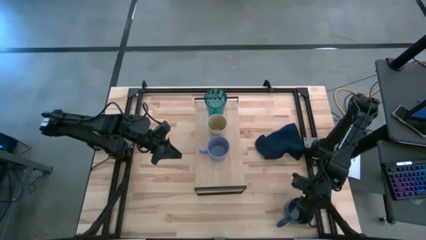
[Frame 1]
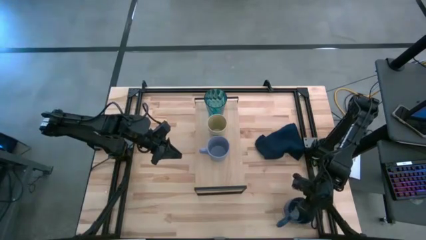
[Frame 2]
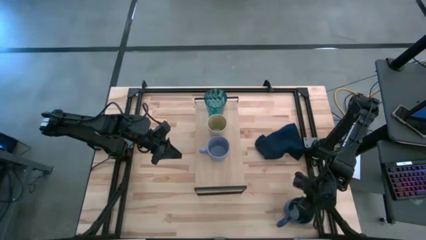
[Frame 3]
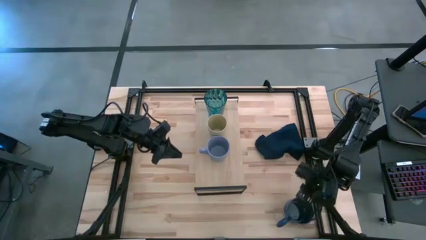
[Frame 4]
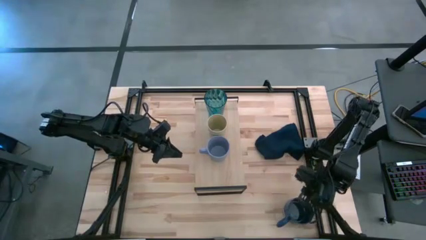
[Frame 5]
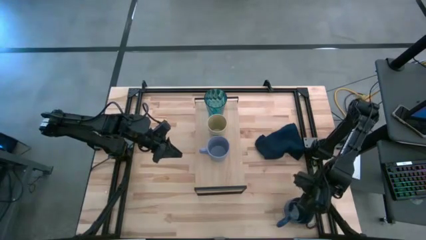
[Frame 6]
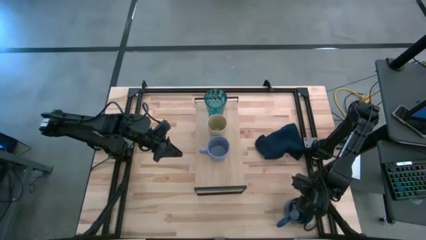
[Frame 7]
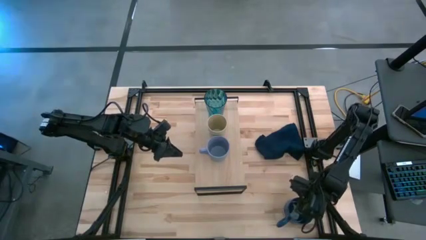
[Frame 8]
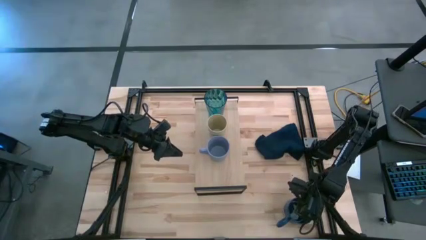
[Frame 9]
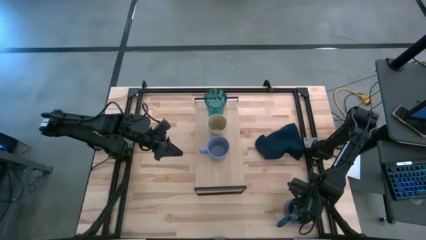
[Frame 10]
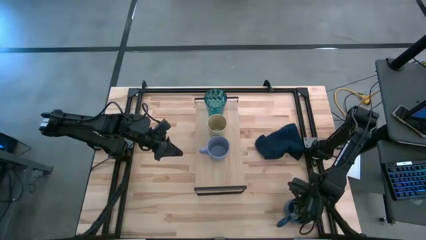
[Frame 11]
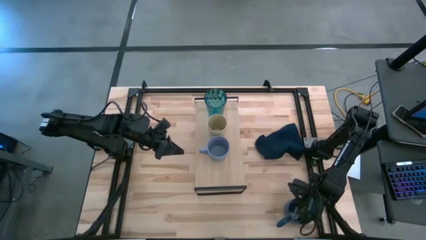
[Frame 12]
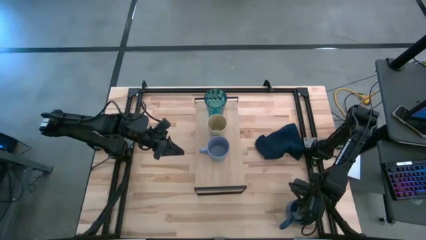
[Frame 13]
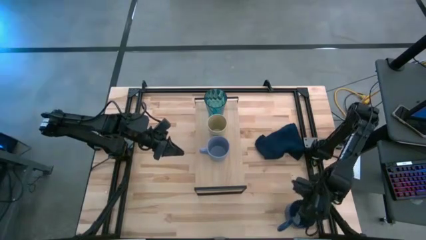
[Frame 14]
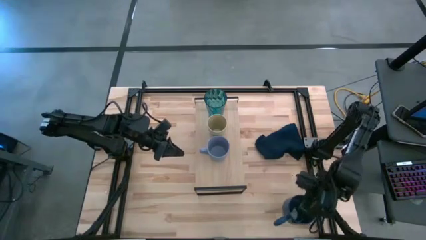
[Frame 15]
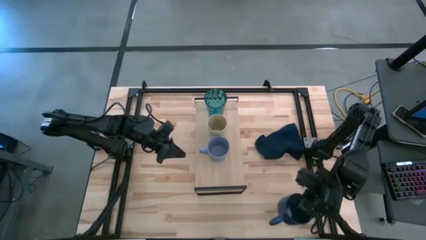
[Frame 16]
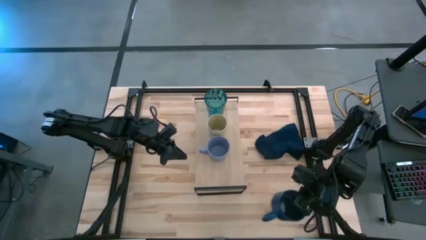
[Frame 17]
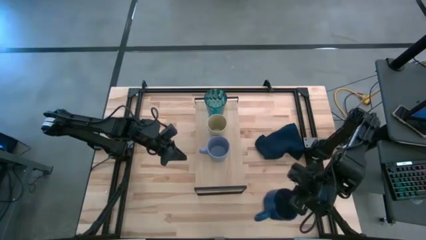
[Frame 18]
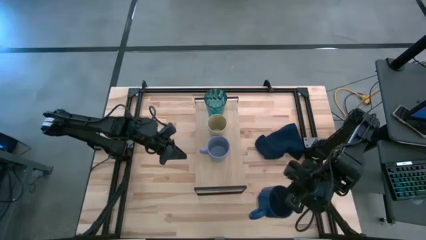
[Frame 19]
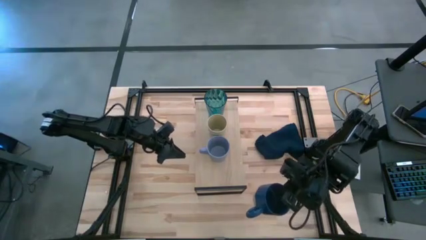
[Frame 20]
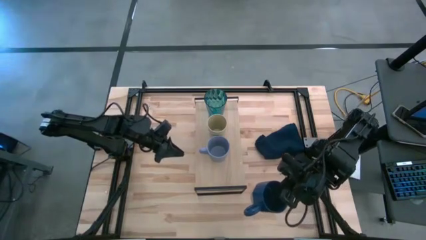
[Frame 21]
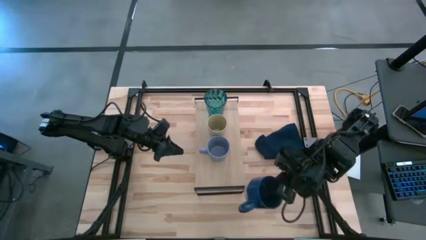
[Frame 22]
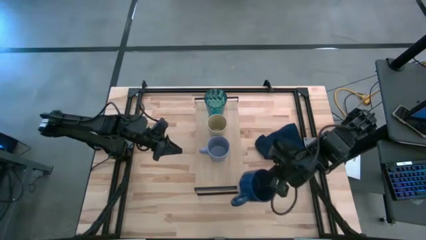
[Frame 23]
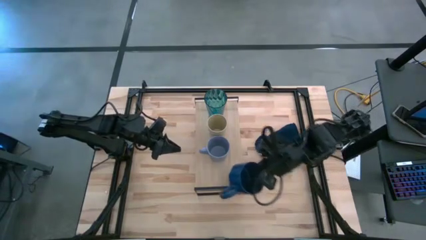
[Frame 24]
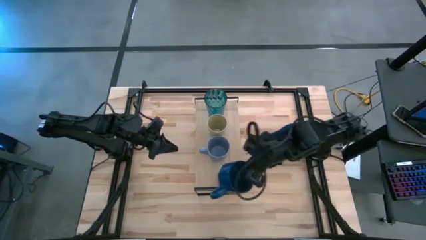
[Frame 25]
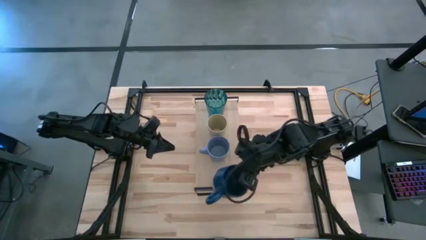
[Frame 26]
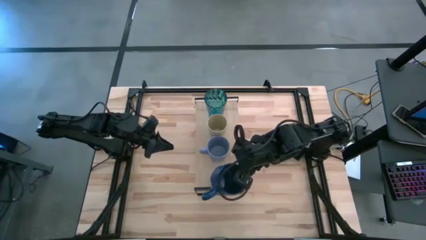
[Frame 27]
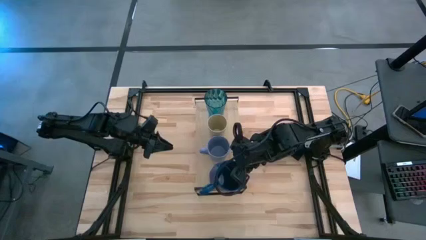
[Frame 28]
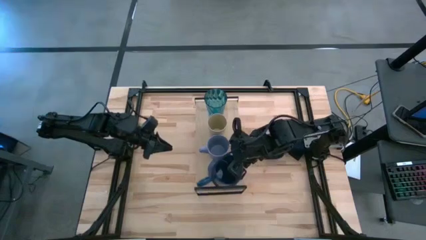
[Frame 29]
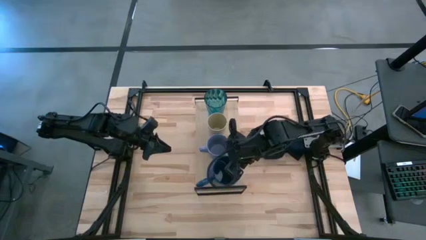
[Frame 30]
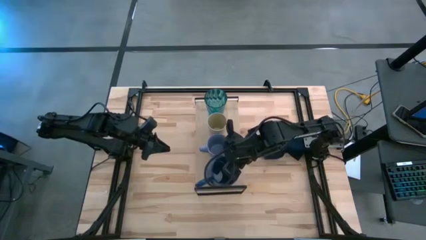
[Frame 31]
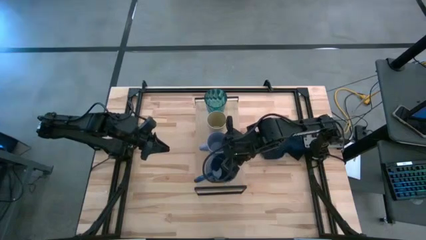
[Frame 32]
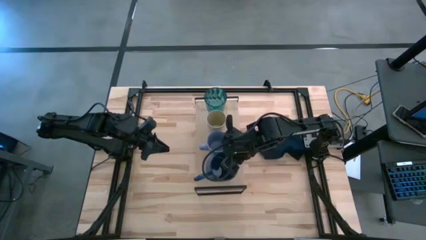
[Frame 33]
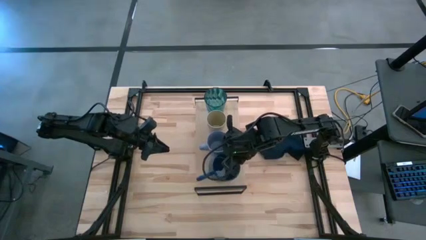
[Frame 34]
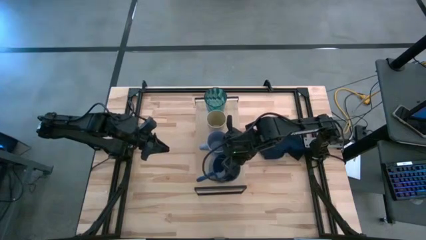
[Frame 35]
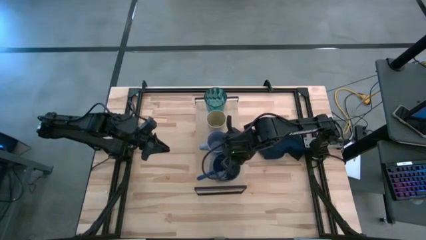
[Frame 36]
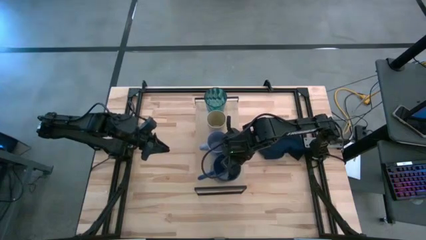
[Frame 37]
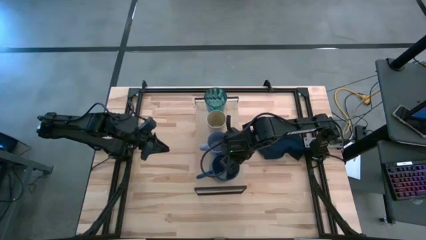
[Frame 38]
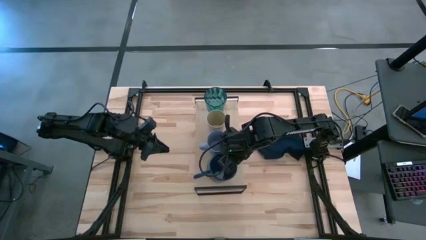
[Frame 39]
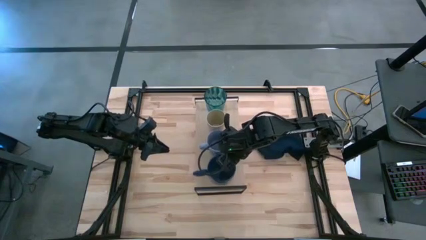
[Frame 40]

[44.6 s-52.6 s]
Task: Stack small to large cups/mugs on shelf
Put the dark blue mug on the shelf

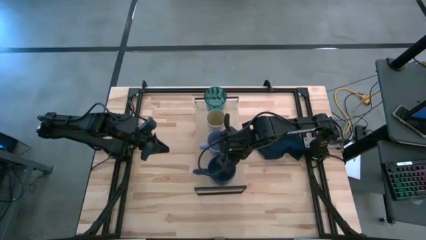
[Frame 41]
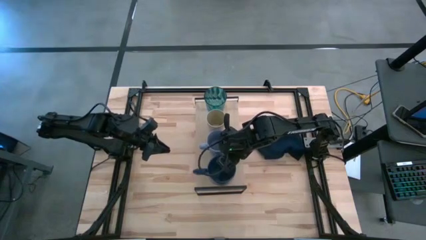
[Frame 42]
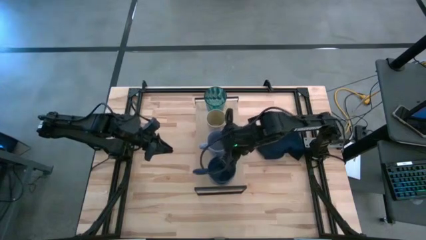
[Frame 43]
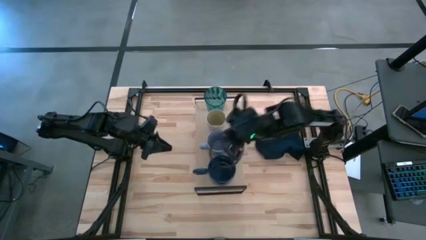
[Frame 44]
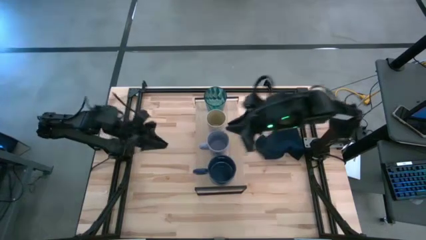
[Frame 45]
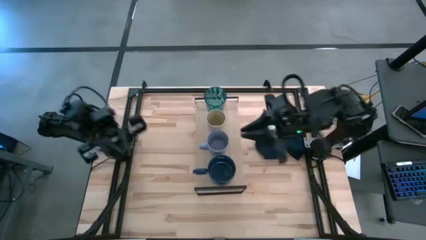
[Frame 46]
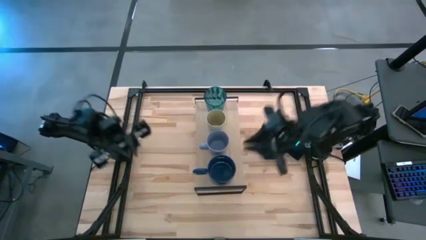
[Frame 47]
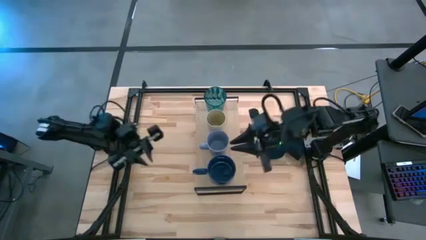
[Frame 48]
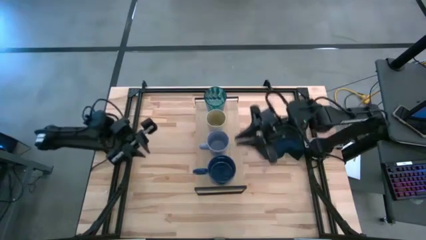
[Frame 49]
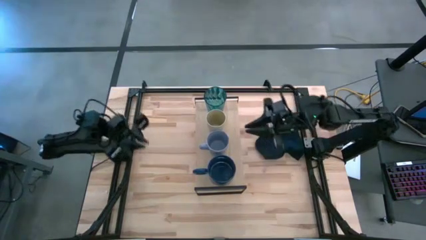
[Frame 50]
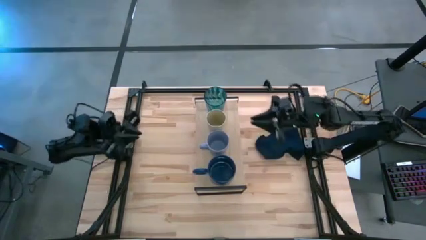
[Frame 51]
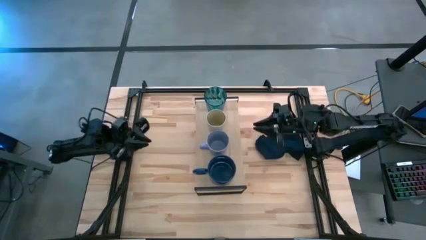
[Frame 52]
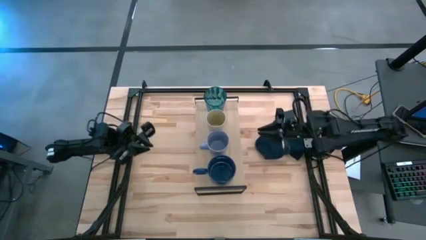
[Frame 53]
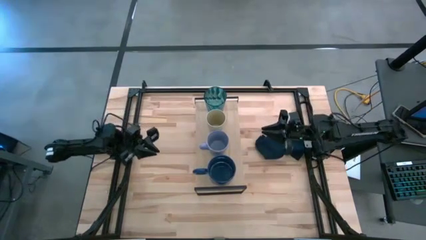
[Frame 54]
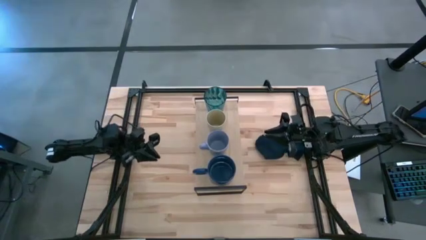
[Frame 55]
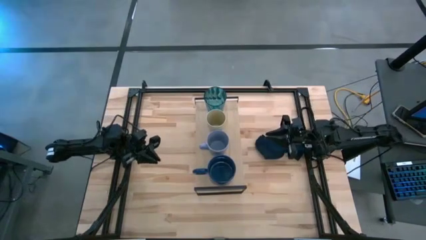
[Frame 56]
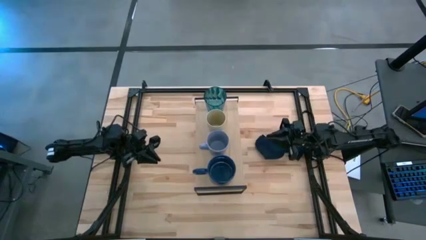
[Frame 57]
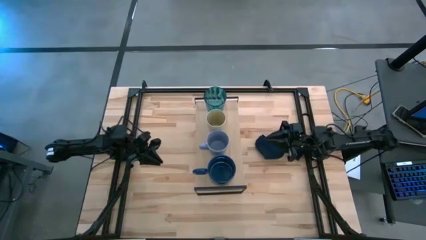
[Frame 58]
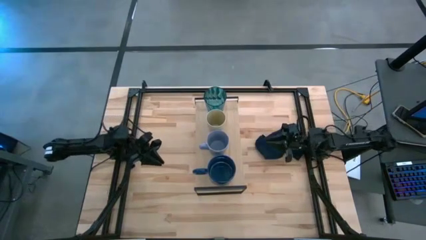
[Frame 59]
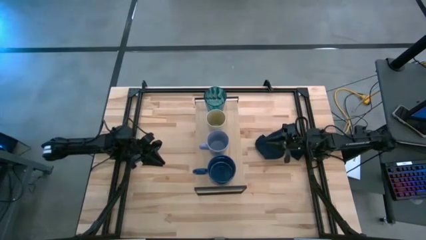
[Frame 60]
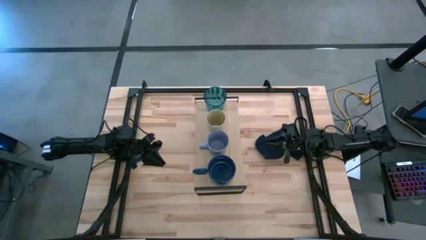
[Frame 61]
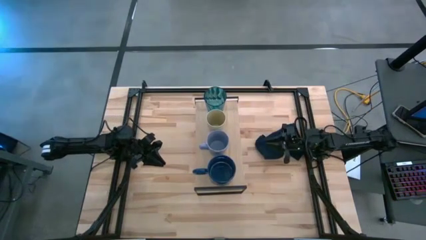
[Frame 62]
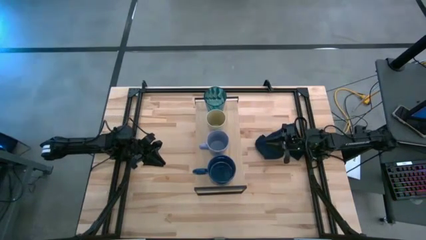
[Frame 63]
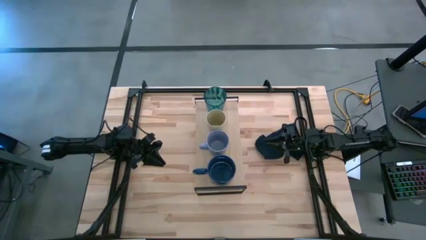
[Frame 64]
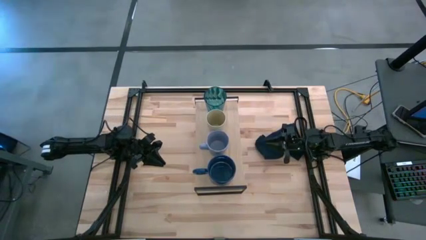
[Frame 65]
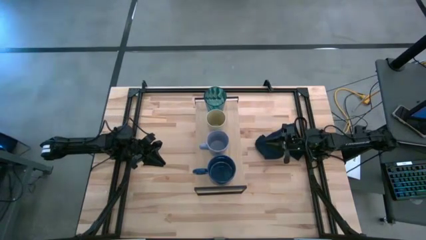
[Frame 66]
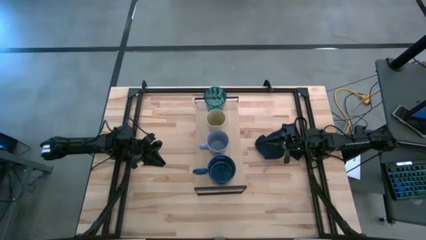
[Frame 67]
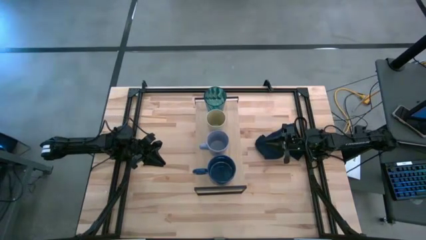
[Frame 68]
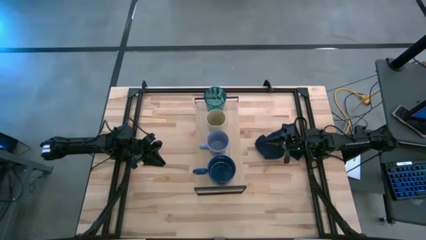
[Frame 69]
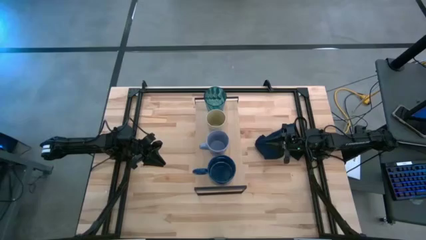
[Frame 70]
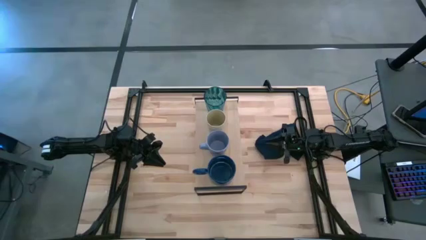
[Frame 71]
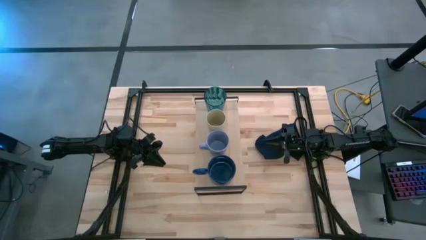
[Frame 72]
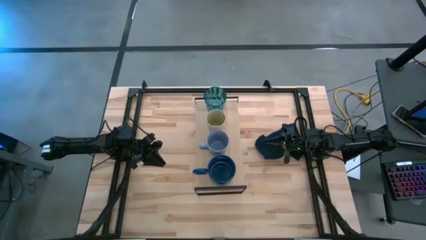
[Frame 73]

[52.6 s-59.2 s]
Return to Home Position
